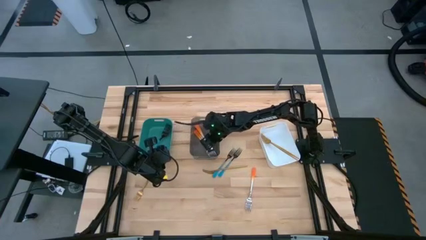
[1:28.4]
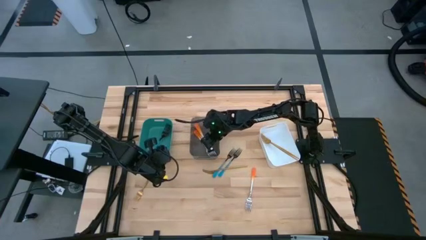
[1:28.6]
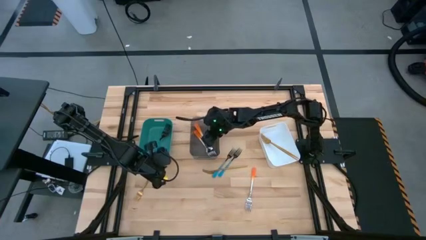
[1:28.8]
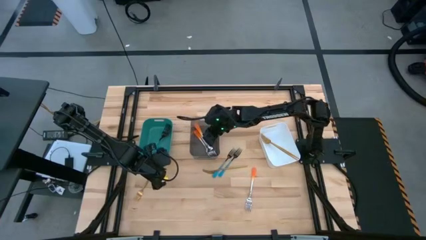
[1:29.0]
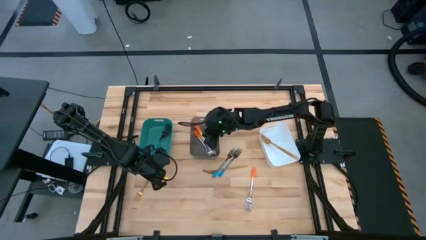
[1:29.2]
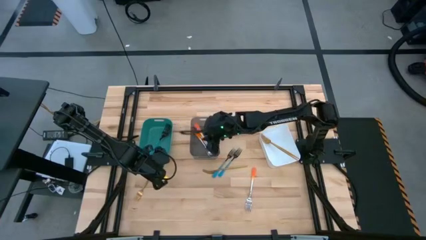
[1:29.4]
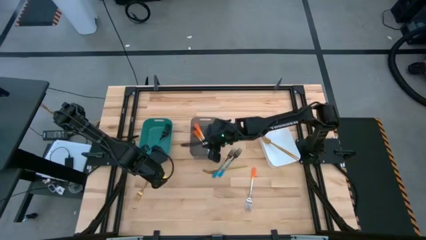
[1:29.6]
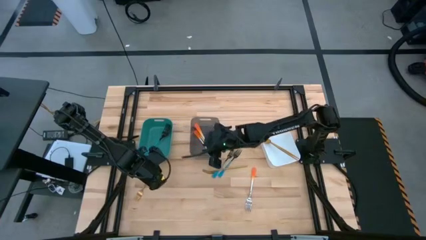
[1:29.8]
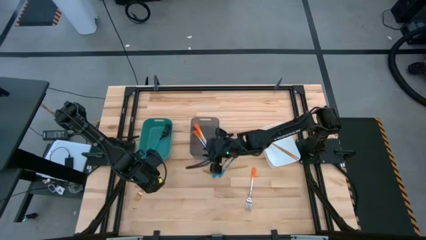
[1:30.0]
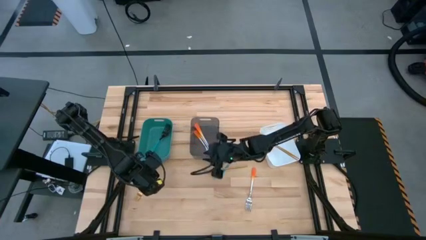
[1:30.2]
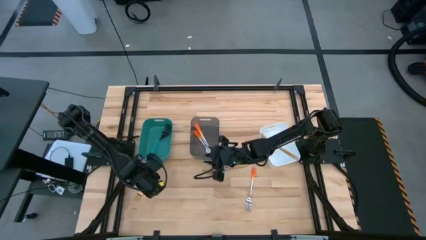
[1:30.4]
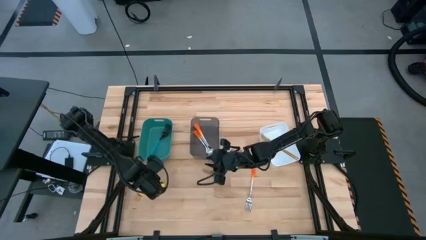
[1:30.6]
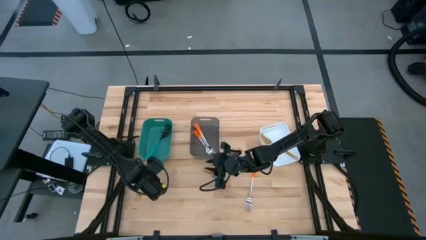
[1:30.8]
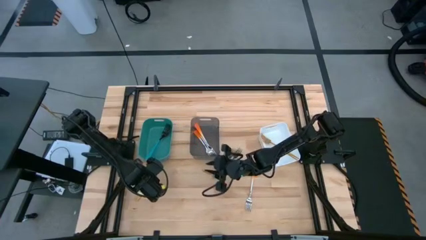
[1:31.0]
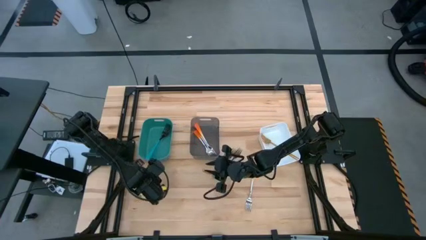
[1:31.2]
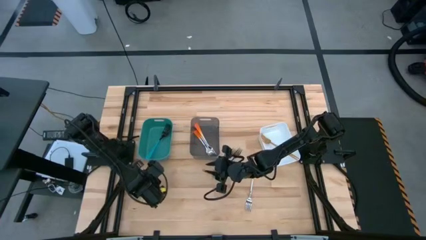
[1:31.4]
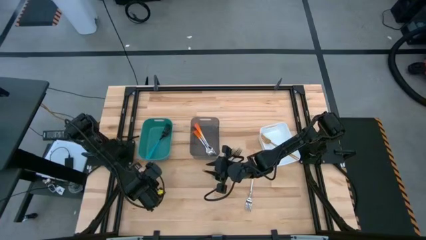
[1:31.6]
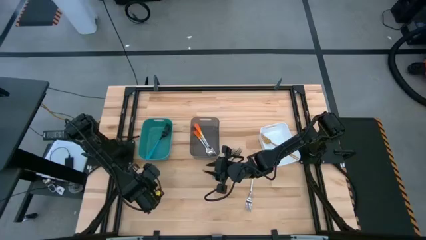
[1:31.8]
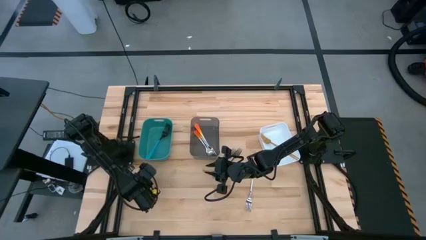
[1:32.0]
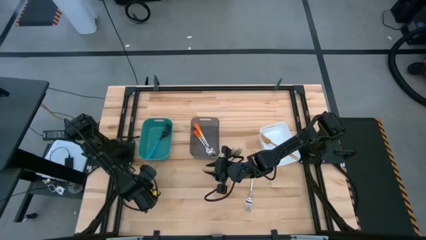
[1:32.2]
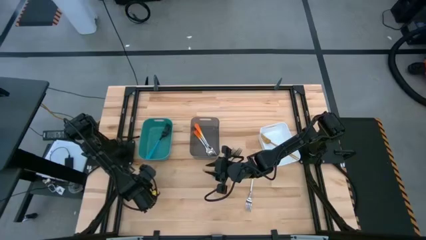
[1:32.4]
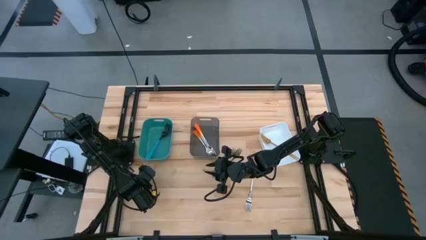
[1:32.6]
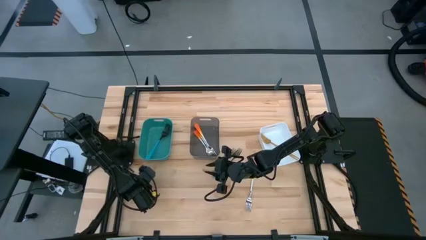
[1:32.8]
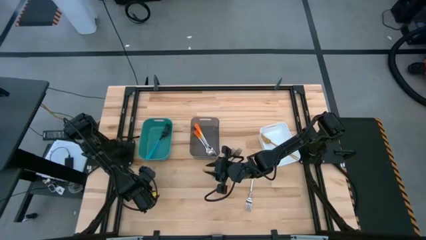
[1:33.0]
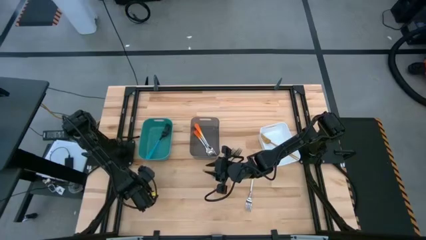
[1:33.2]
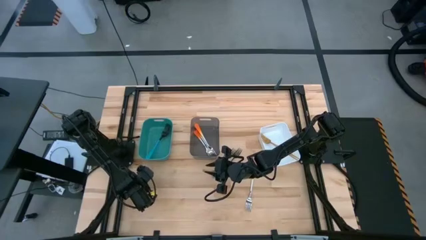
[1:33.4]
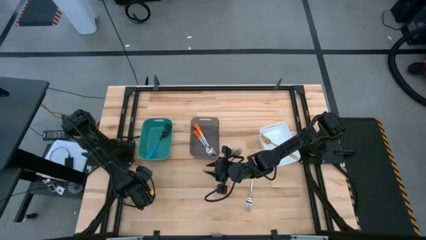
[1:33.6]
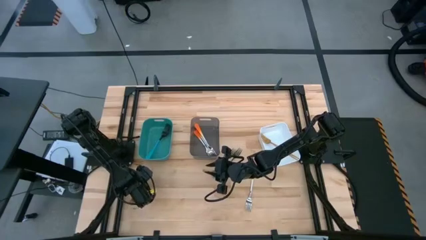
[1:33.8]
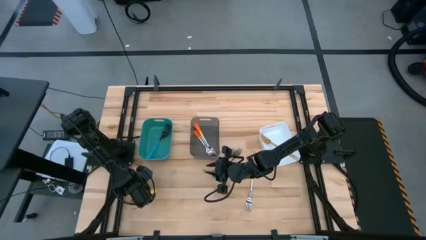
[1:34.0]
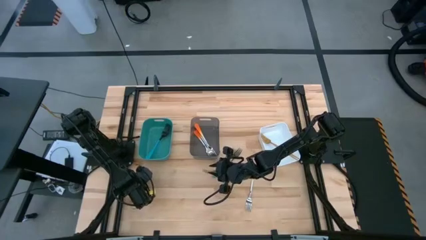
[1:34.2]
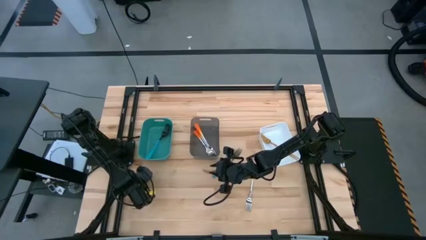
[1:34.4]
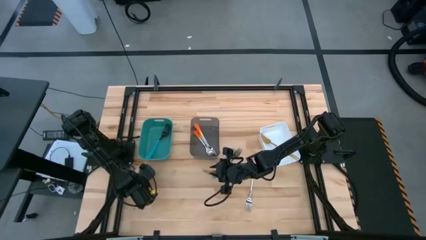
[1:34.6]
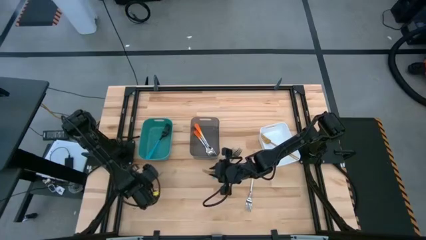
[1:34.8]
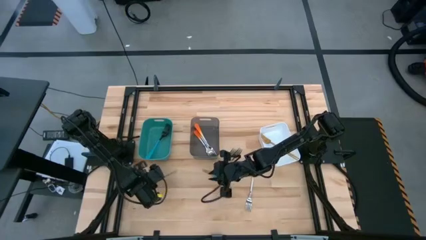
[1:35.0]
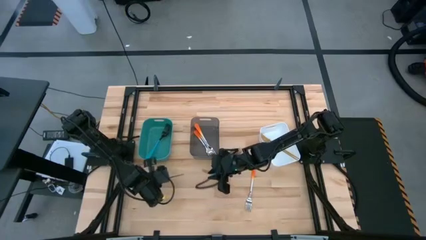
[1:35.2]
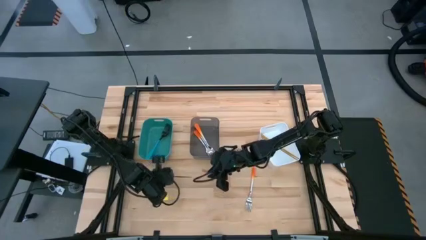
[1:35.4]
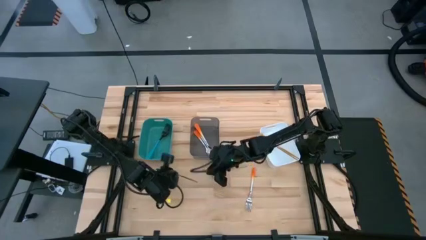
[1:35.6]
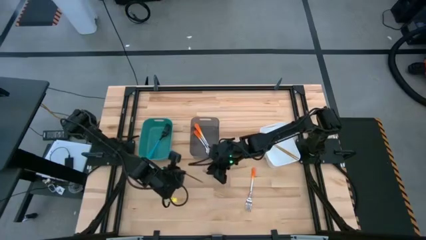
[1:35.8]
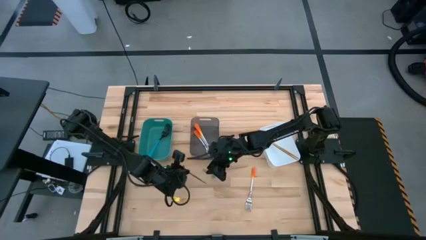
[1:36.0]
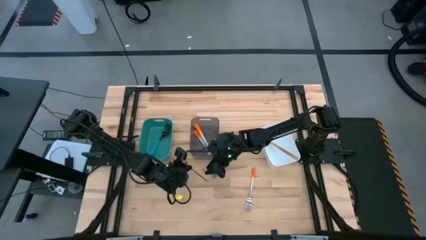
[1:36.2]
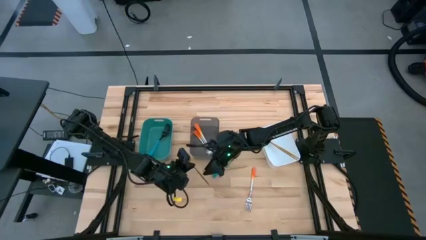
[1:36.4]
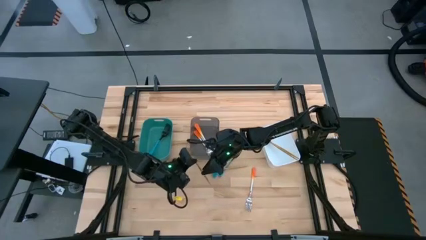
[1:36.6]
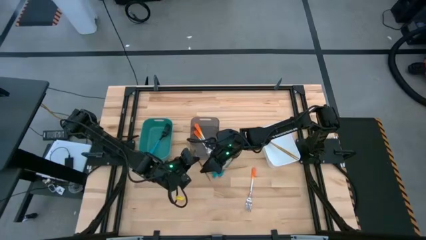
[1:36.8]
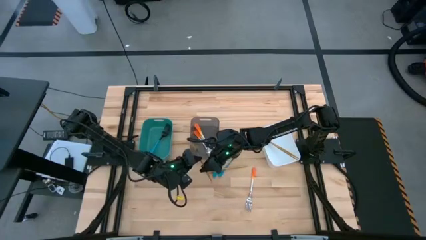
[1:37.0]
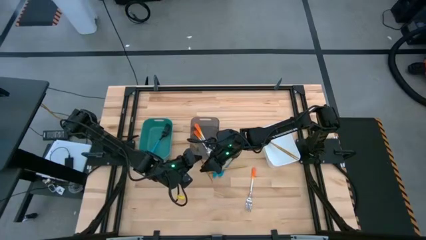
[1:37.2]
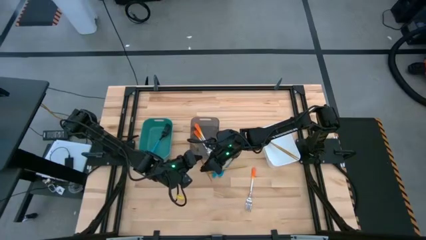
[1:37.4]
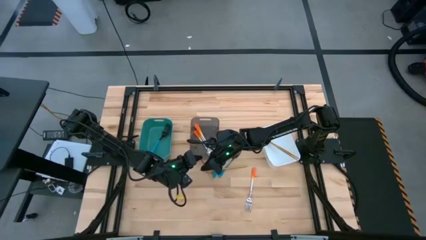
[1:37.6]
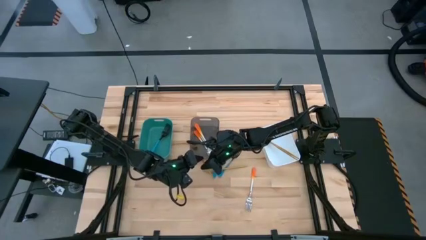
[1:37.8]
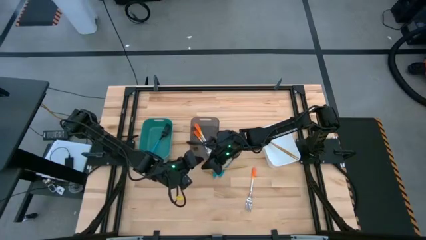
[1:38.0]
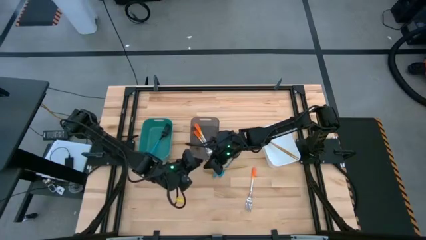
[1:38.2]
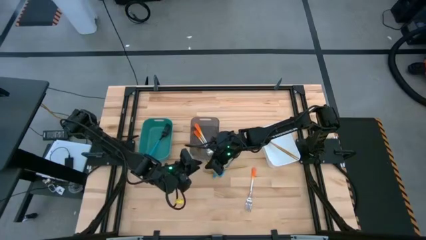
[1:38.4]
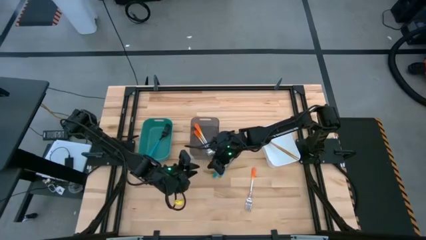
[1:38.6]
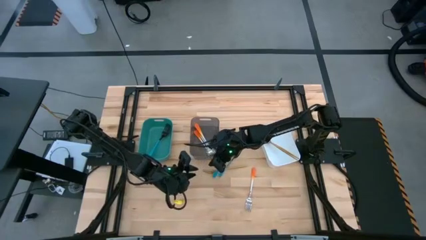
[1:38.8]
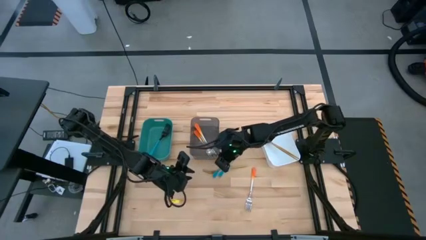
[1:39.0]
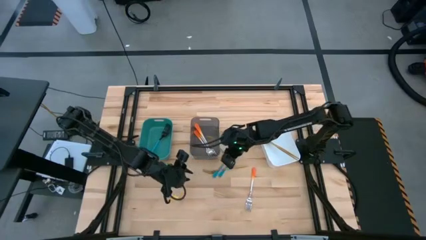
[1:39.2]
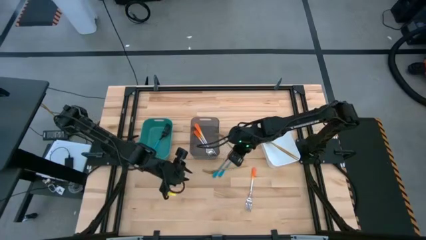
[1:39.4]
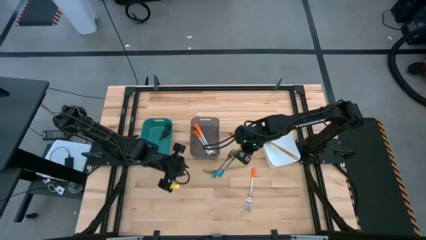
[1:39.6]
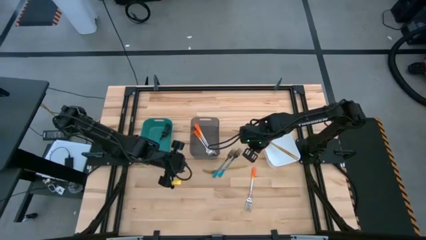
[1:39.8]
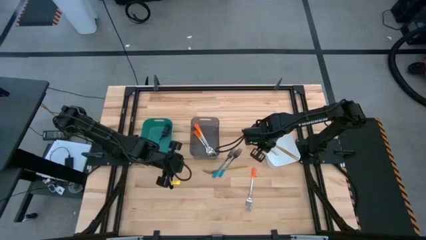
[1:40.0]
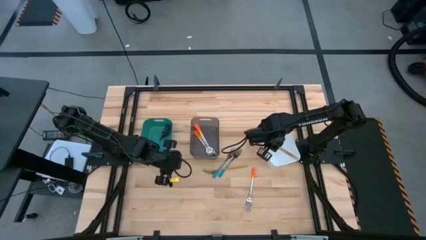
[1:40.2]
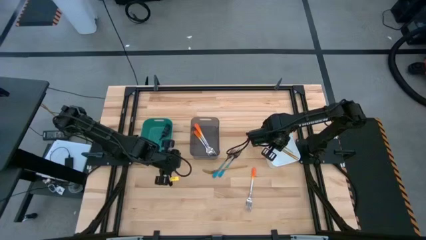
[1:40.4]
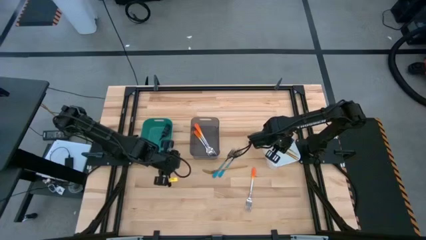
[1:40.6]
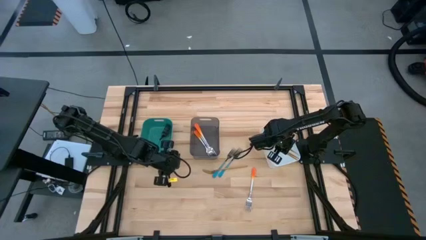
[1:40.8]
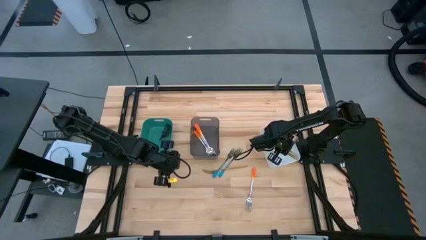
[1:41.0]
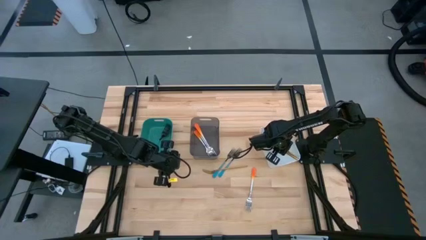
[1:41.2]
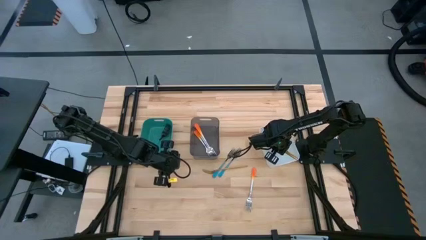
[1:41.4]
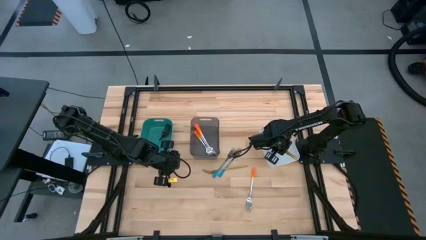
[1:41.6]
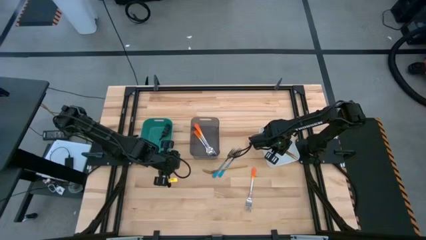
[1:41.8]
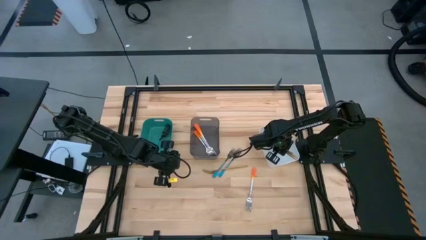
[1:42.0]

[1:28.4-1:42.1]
Task: Sort silverware by color (type)
Put the gold fork into the white bin

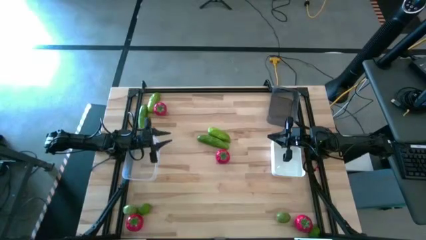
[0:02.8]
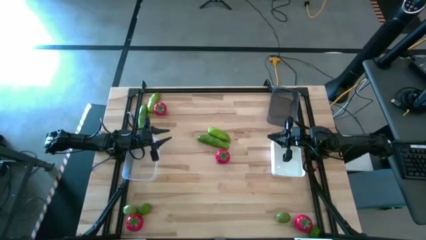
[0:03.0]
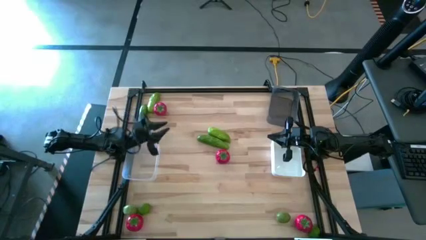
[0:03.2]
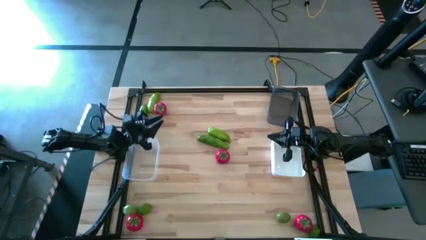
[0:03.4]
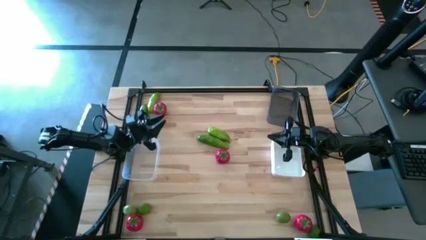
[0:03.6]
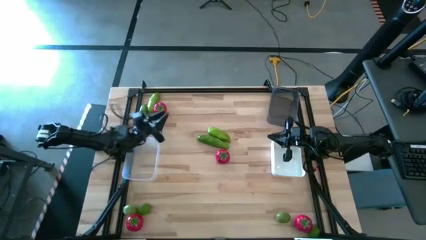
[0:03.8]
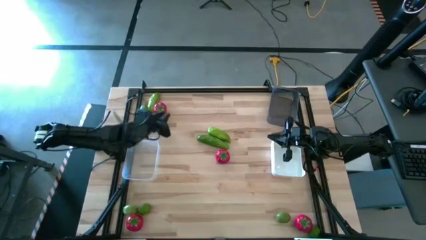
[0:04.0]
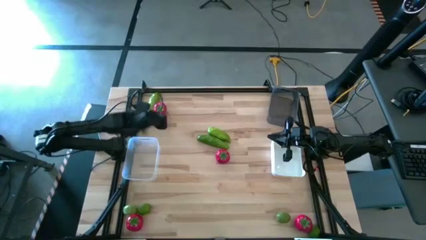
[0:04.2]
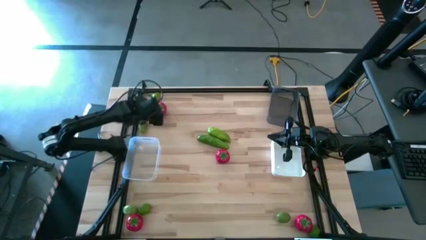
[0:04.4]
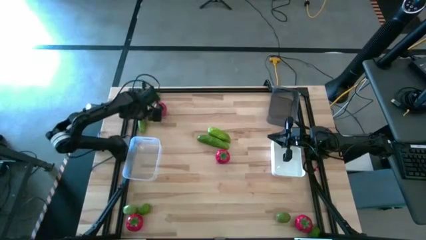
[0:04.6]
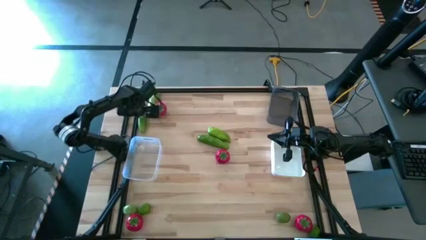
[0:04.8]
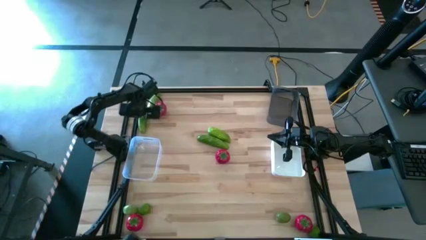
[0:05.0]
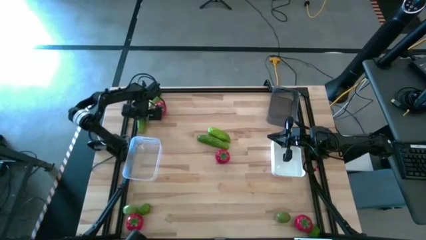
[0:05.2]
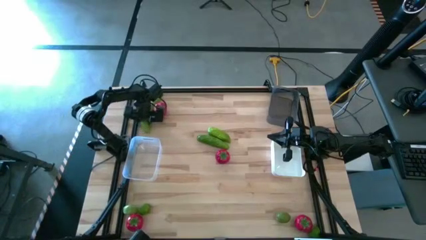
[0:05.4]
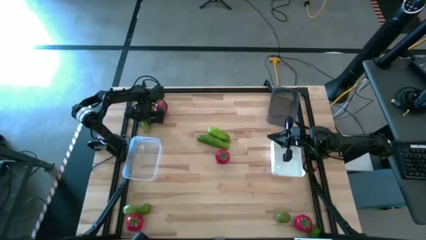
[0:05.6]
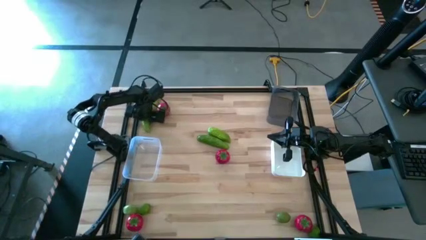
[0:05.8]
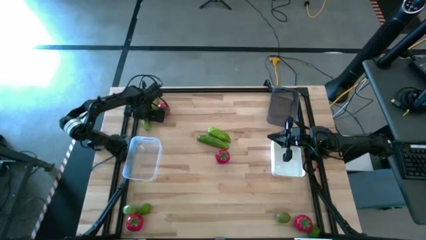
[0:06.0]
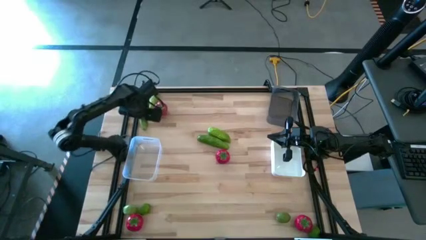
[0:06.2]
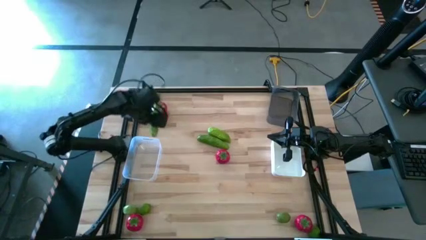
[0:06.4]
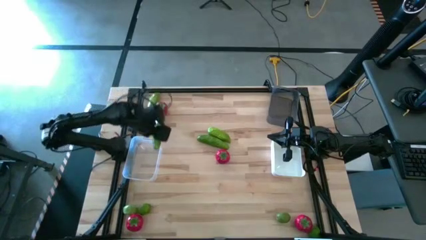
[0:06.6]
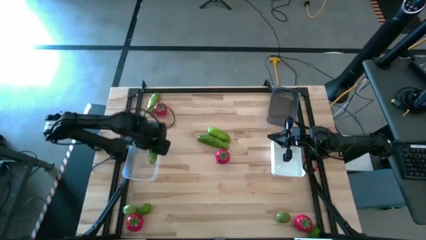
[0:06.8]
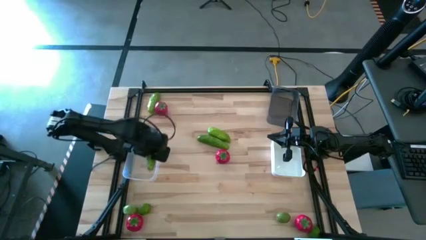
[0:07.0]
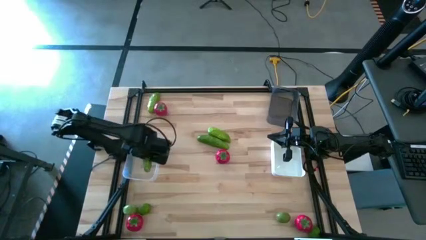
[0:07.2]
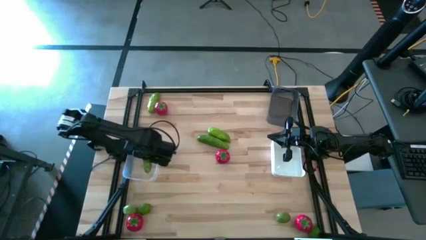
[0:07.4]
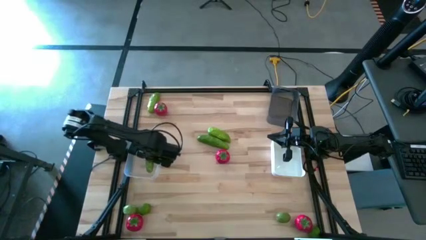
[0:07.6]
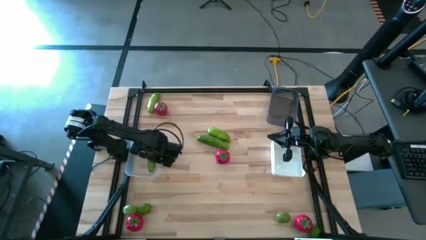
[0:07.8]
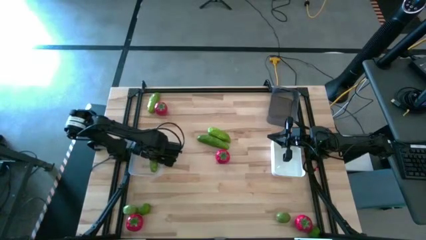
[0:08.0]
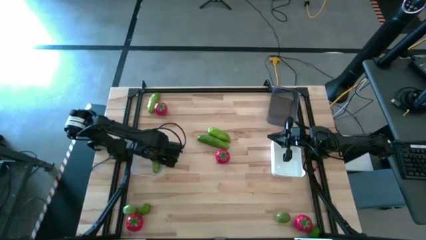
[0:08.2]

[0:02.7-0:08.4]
Task: Sort produce into baskets
Put the cucumber into the transparent bin
